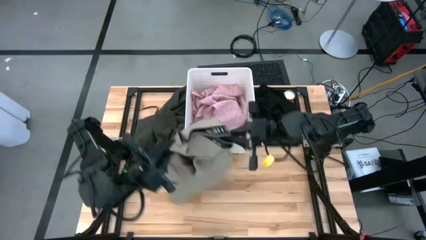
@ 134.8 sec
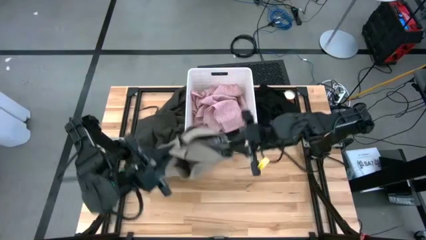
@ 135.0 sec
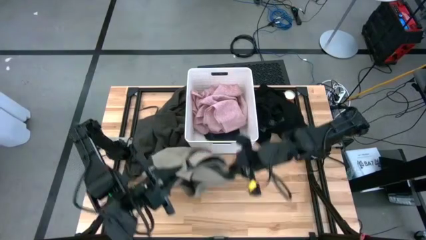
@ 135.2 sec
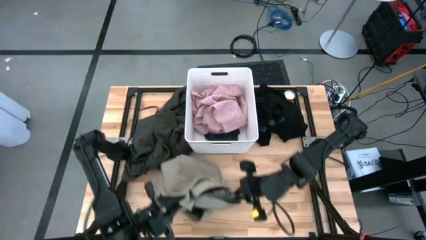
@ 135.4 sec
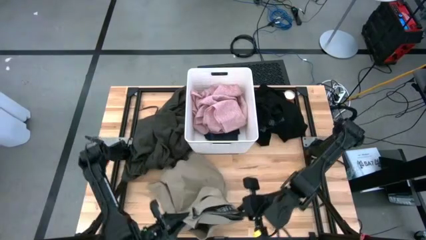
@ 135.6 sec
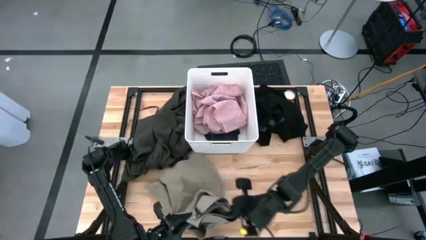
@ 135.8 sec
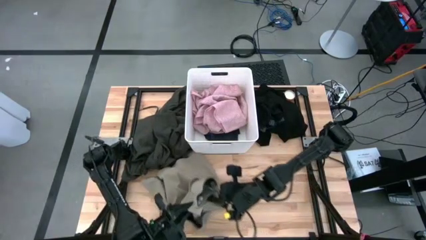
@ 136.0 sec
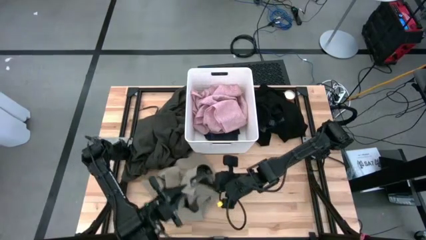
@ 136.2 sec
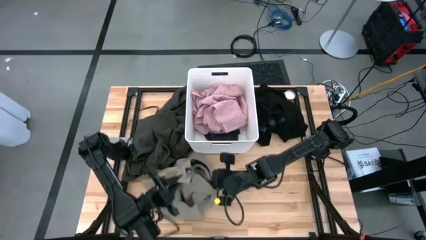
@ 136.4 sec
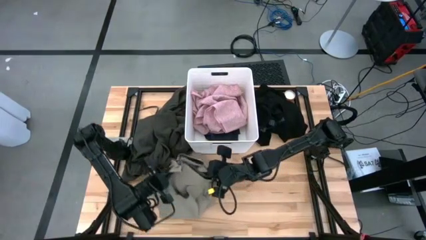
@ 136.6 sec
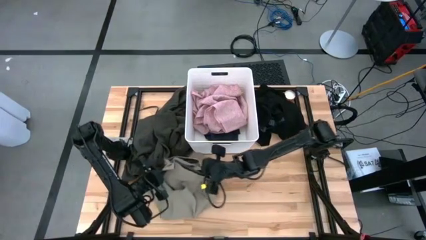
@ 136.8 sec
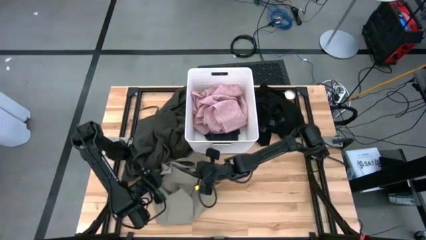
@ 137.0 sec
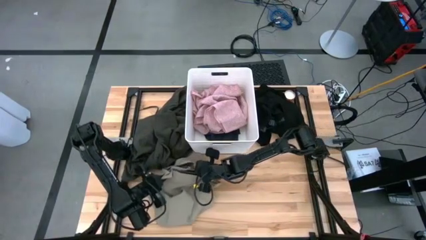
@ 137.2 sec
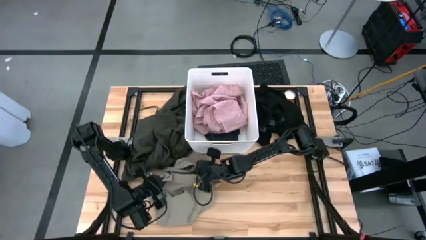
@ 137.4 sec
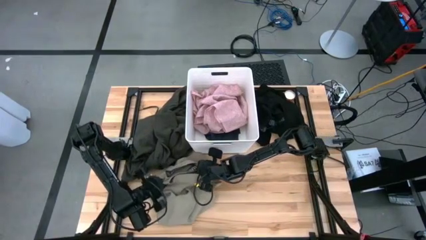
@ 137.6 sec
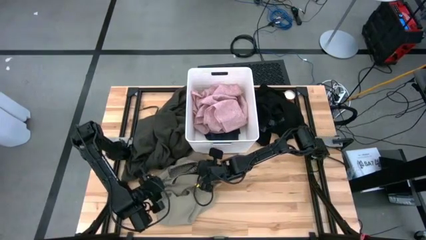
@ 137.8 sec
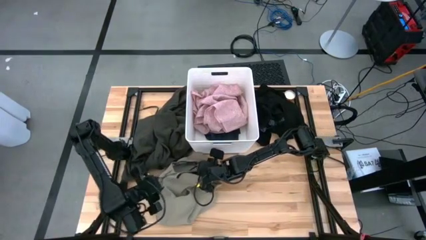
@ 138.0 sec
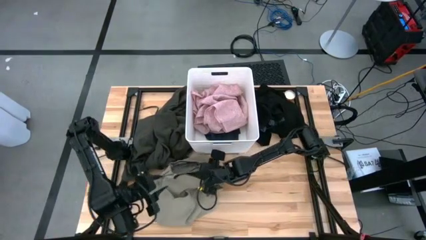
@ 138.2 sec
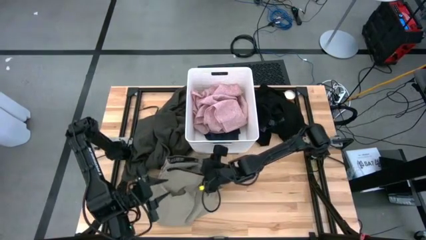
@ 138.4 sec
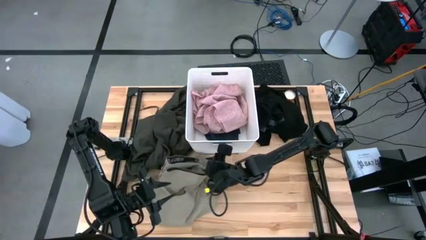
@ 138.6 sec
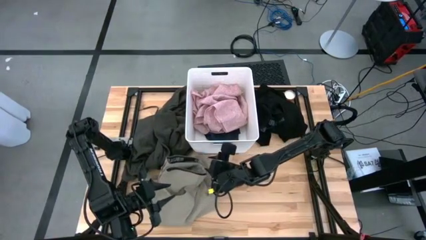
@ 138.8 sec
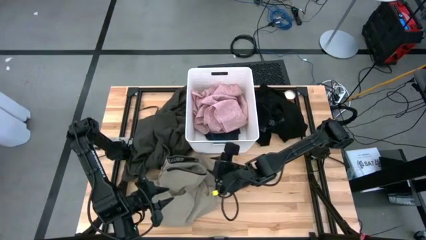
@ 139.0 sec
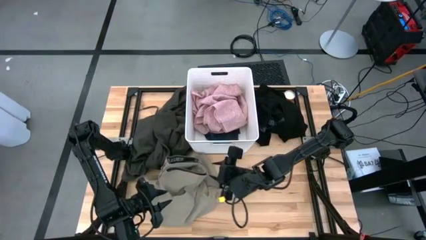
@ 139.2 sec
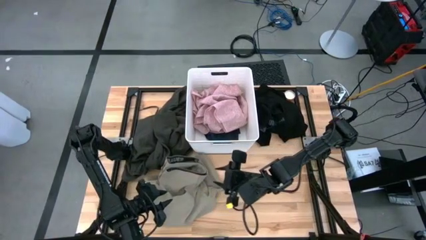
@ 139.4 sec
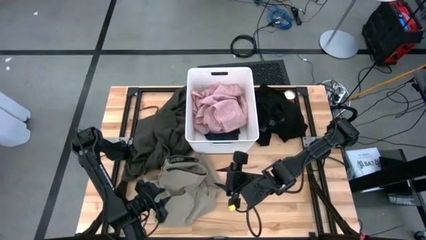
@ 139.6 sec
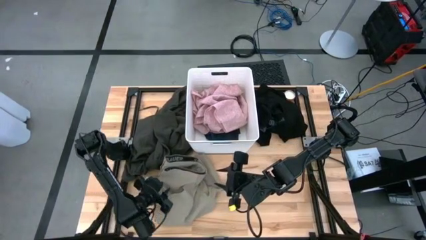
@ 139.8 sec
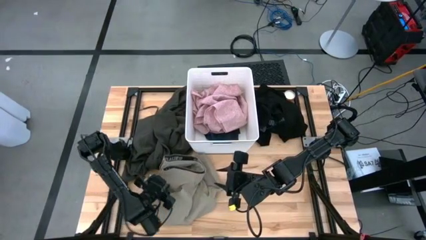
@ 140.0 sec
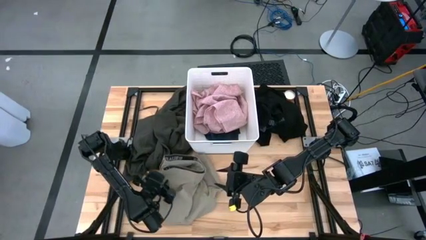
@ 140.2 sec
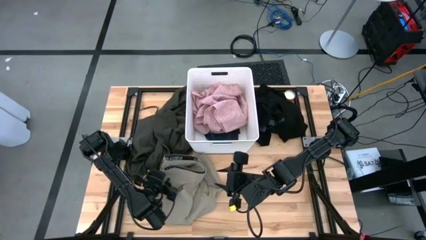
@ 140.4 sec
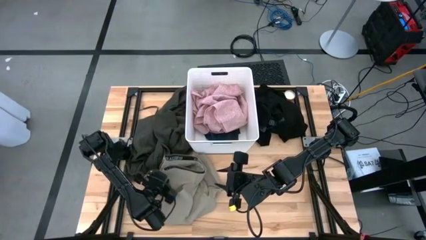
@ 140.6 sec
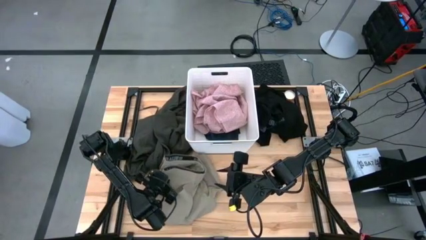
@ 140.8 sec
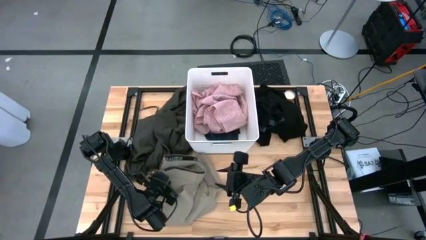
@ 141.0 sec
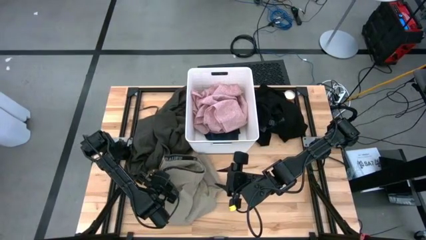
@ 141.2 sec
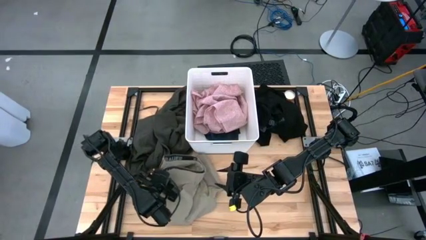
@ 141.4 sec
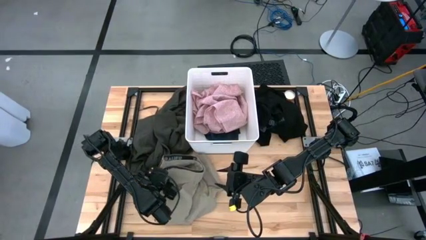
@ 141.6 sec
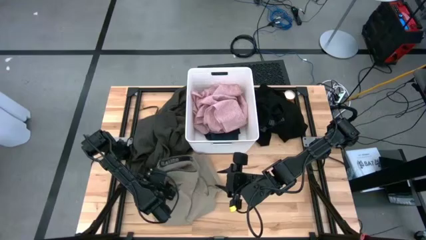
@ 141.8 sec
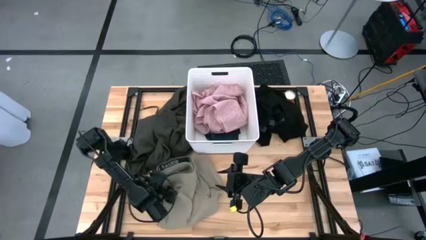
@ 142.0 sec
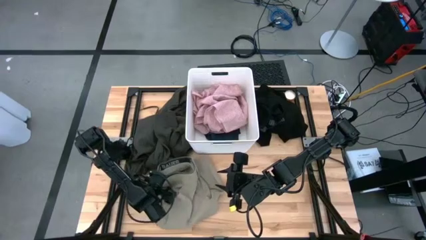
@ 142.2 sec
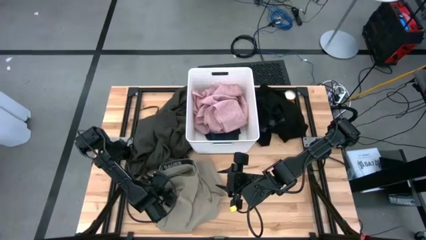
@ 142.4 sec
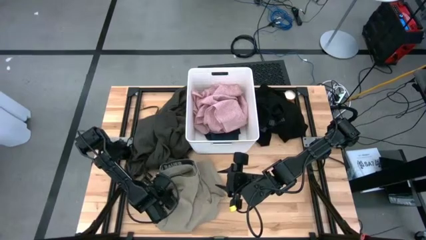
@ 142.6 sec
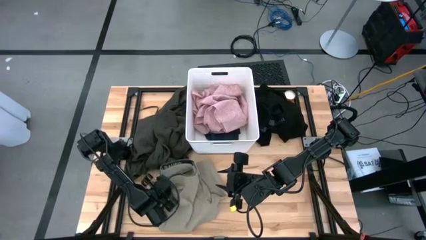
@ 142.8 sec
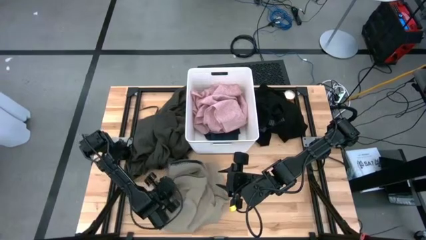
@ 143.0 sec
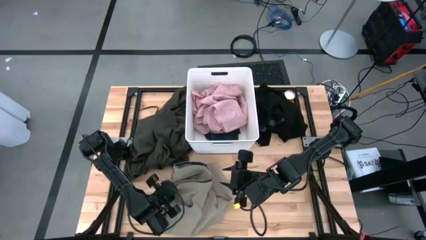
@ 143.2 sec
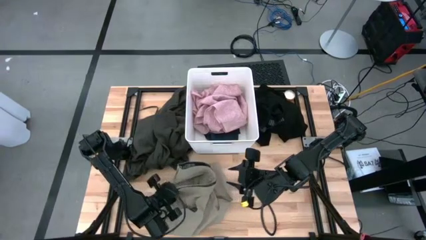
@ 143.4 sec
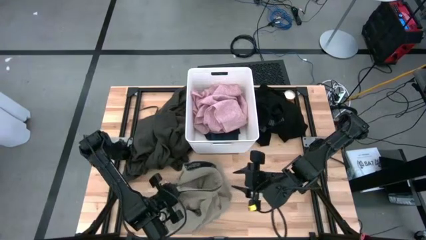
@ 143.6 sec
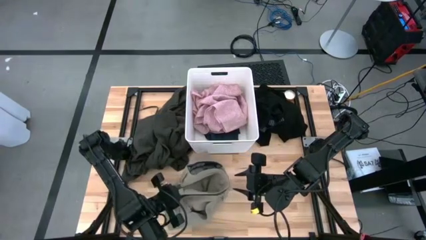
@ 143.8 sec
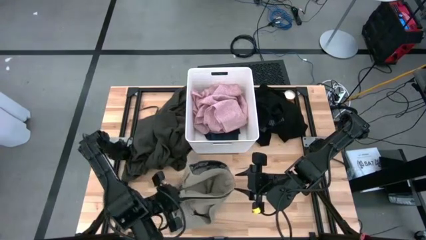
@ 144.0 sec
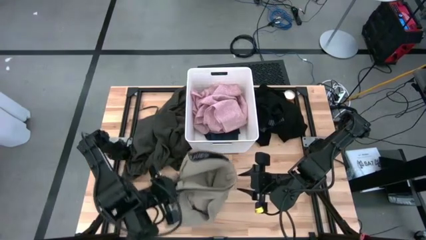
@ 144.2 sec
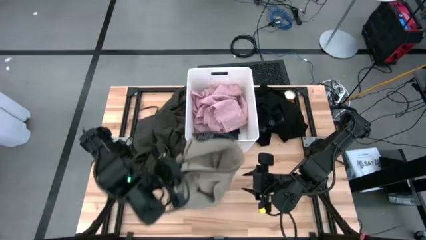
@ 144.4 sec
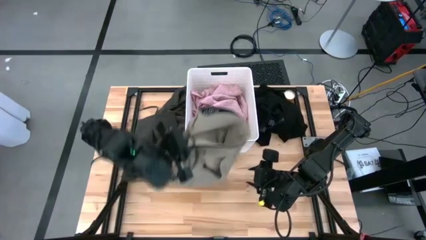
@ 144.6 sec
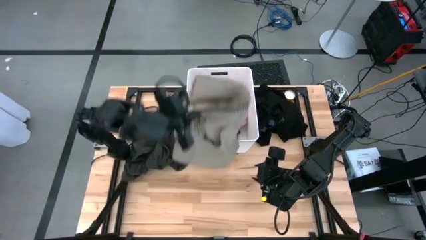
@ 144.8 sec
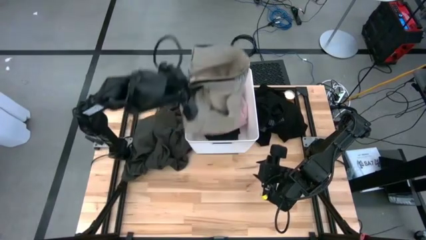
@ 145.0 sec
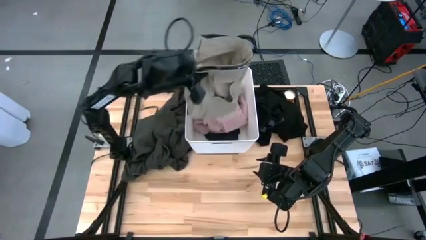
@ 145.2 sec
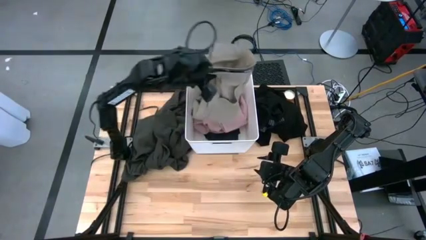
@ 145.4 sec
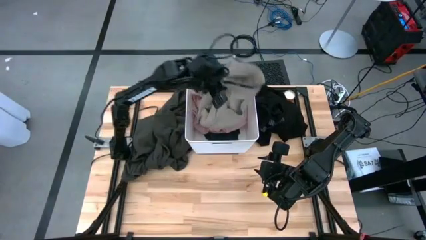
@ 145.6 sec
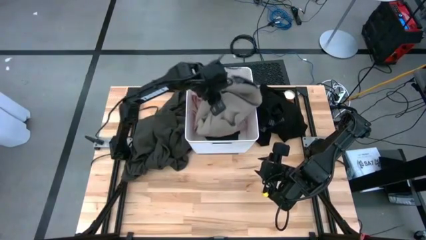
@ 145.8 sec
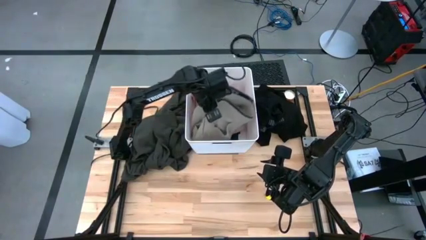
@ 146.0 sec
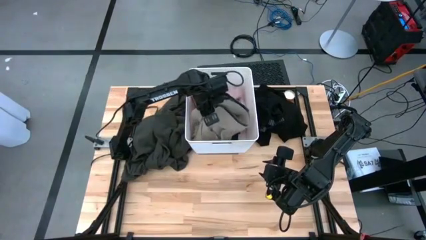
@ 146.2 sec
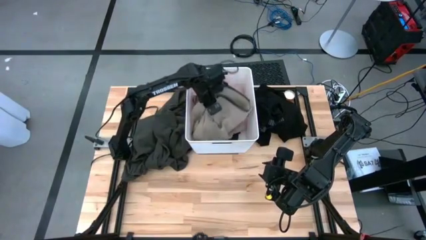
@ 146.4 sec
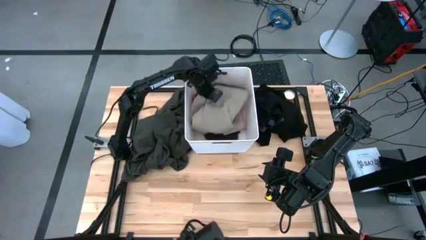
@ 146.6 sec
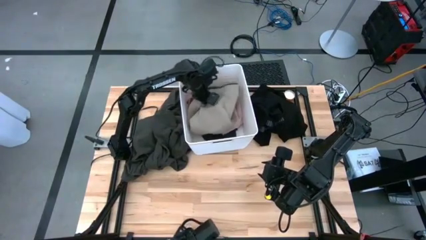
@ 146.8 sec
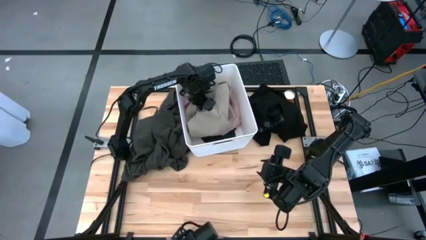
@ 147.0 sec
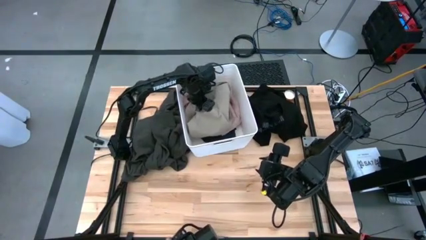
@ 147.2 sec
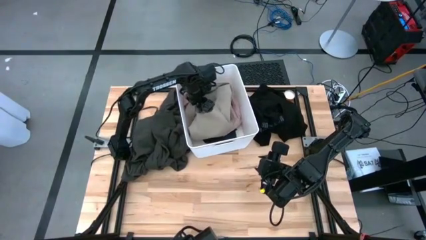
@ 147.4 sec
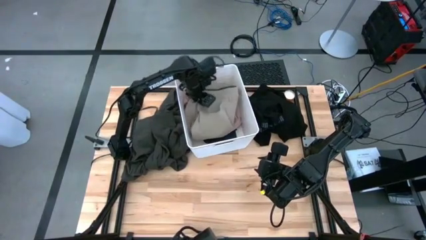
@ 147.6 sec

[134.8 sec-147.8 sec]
Task: Sort clothes
Put the brown shorts into the white laundry bin
